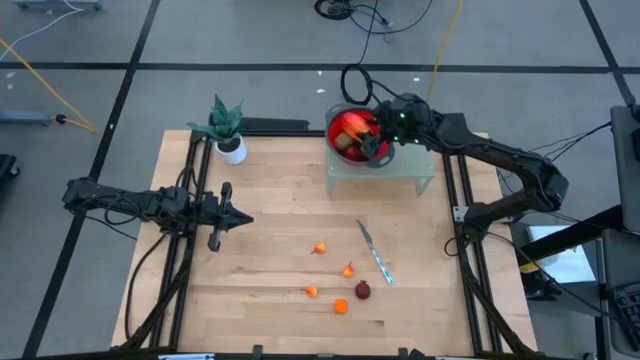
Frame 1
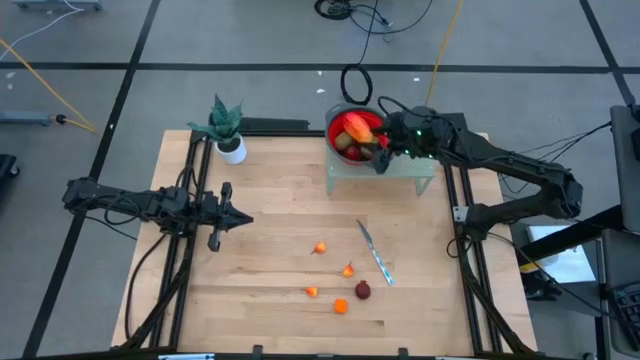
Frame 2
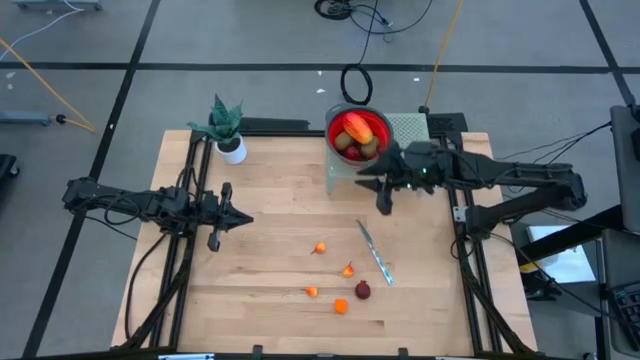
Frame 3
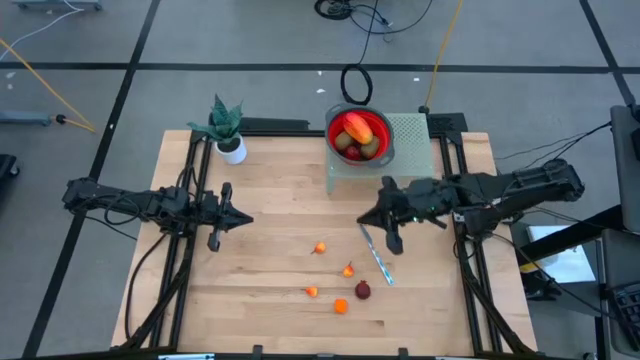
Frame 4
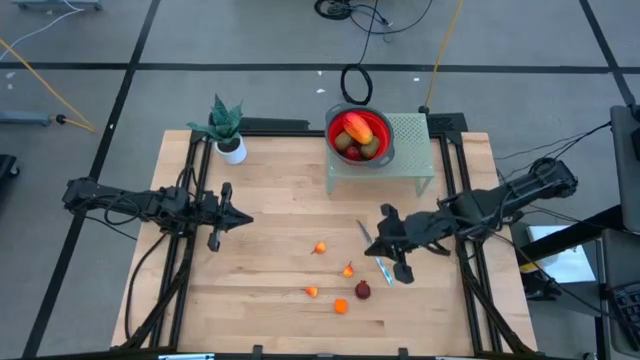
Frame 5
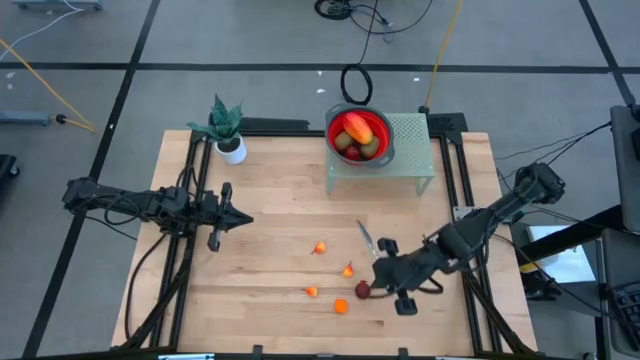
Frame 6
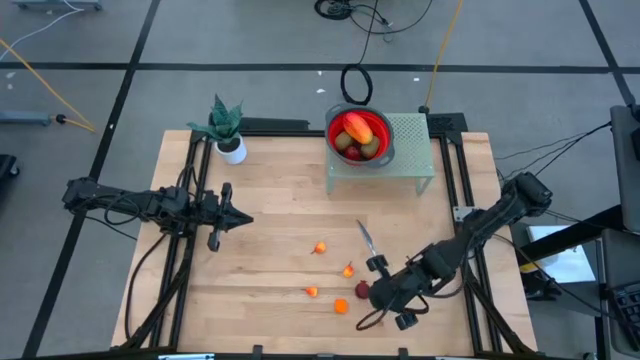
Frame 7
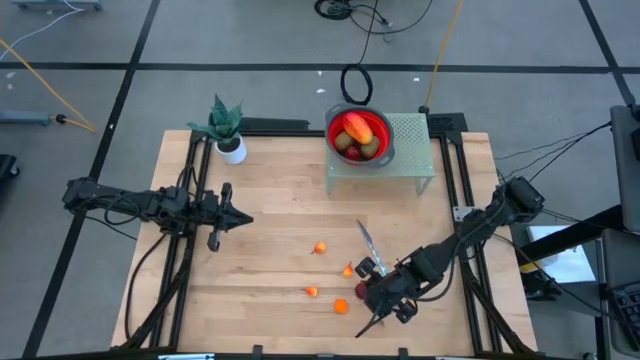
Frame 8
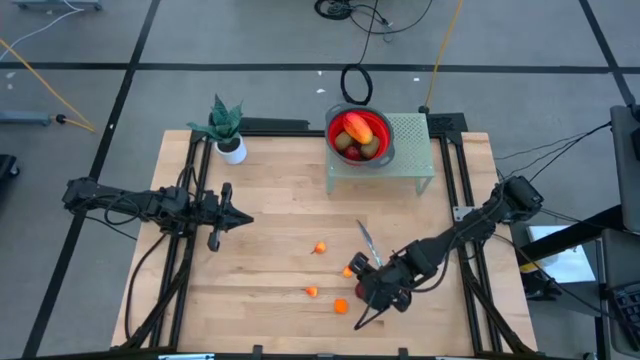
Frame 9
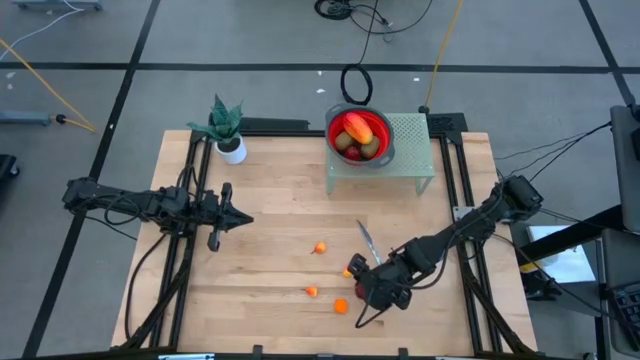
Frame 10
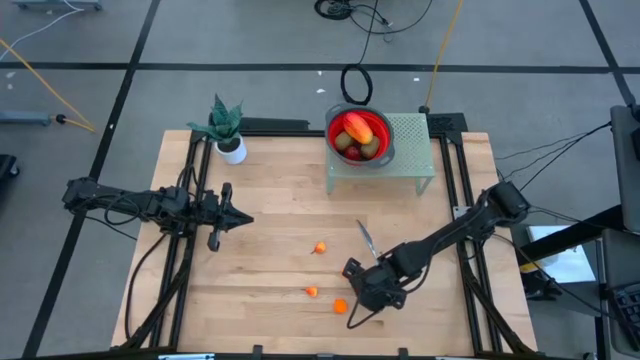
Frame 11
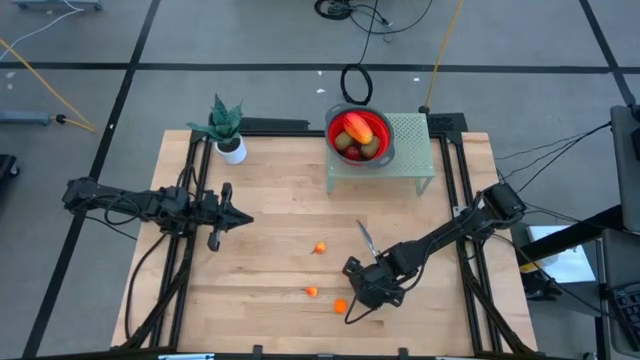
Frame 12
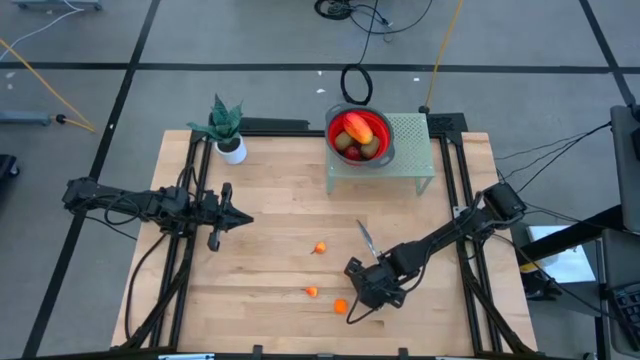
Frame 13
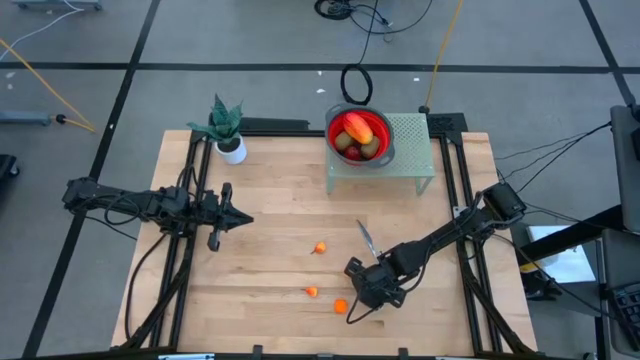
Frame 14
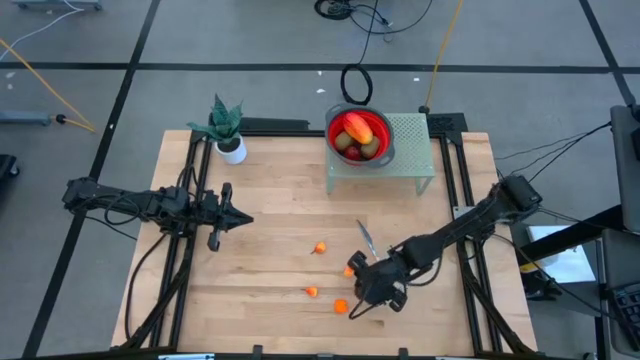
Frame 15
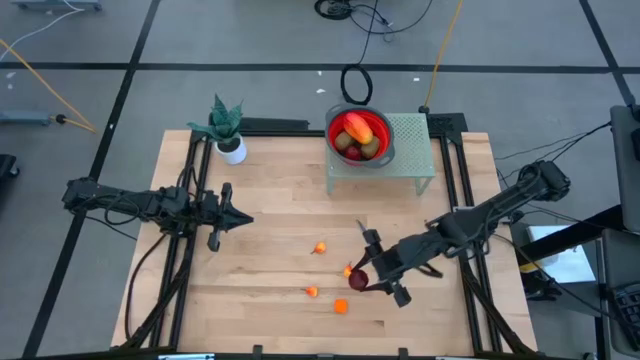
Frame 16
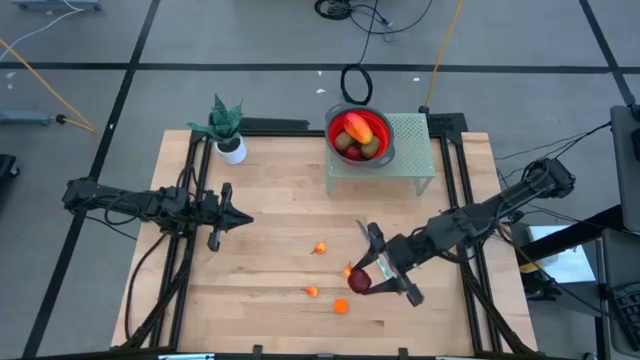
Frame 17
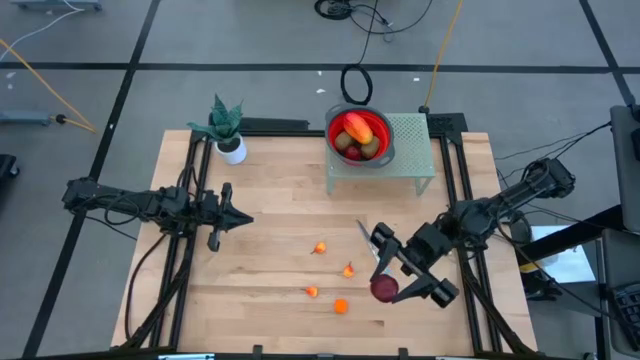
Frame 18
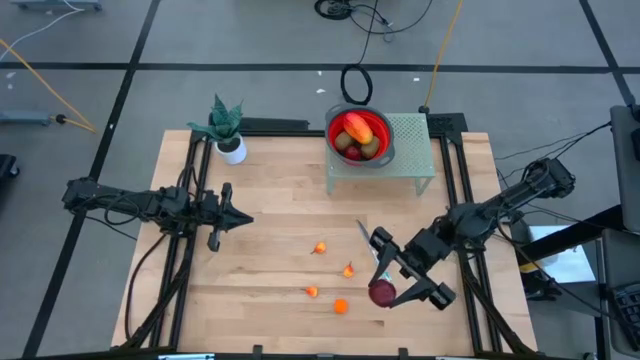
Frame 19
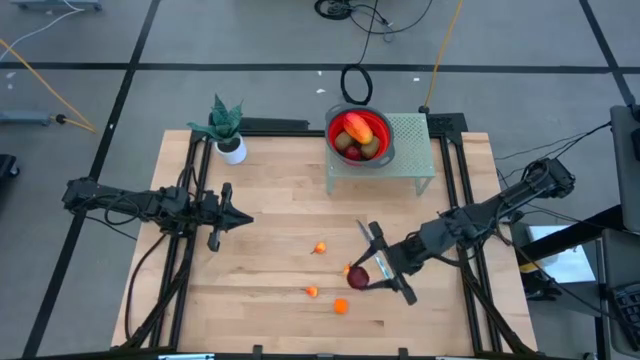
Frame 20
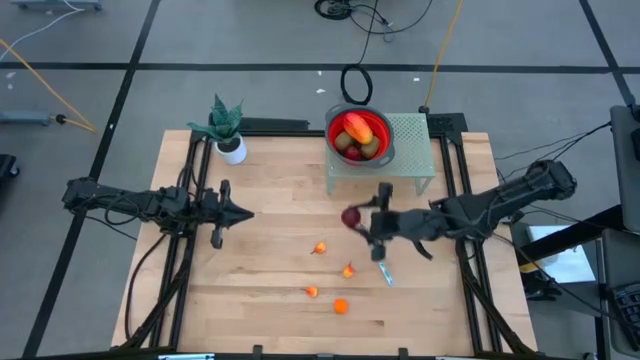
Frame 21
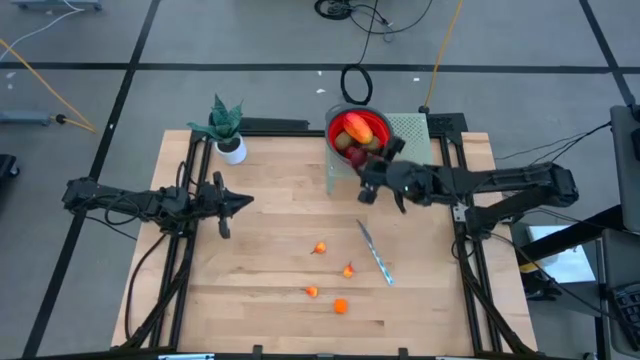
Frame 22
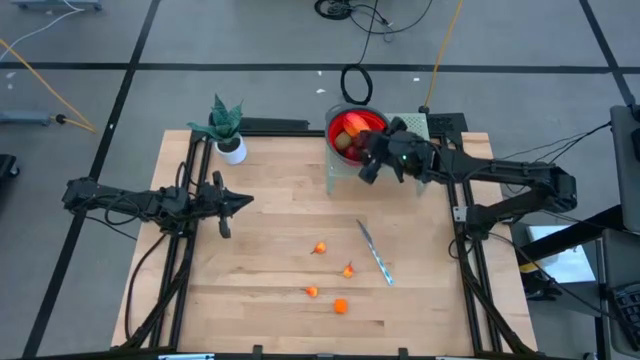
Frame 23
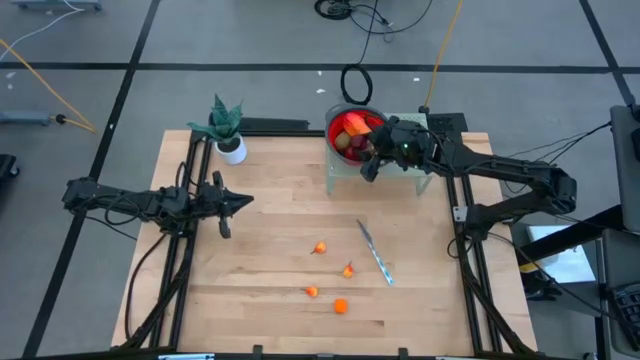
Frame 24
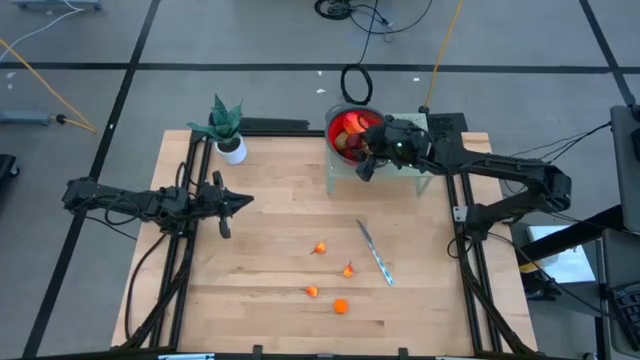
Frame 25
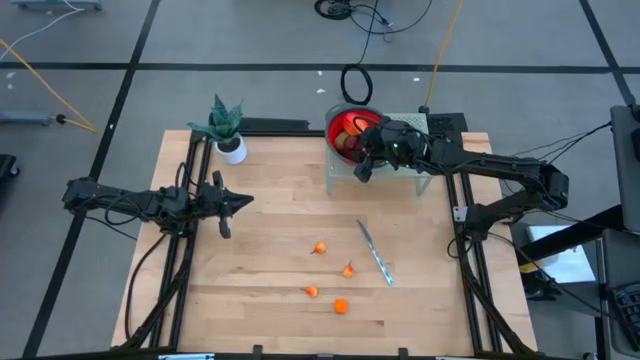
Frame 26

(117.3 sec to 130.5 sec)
Task: Pick & Place Fruit
Put the red pomegranate into the red basket on the shelf

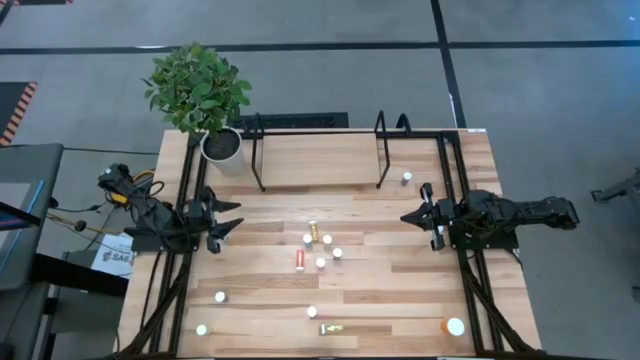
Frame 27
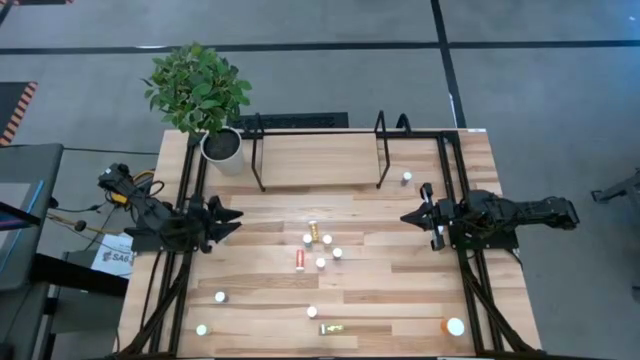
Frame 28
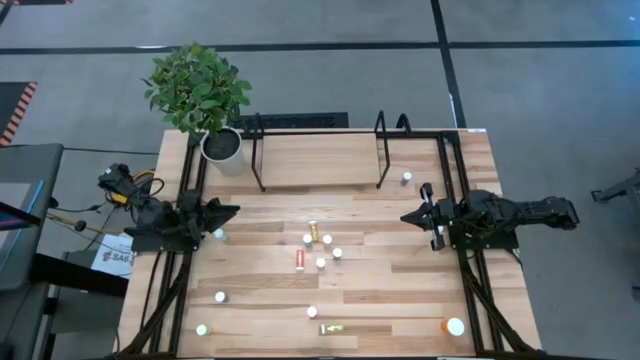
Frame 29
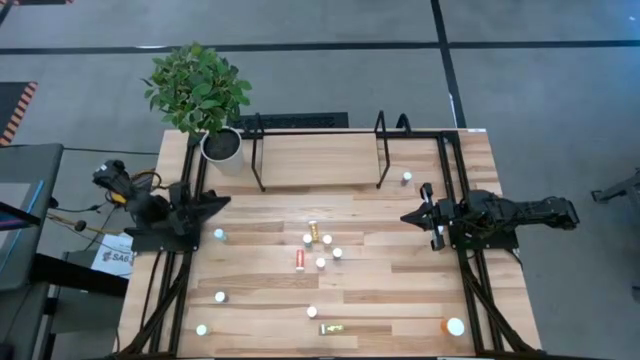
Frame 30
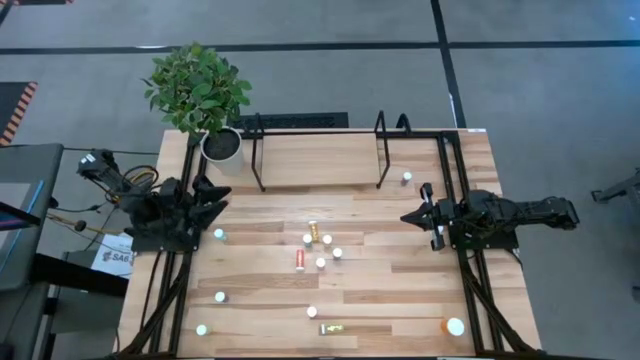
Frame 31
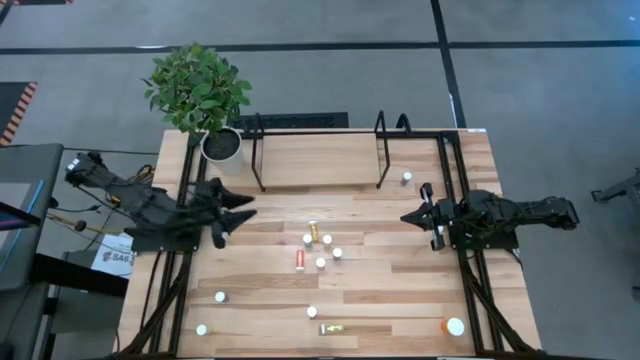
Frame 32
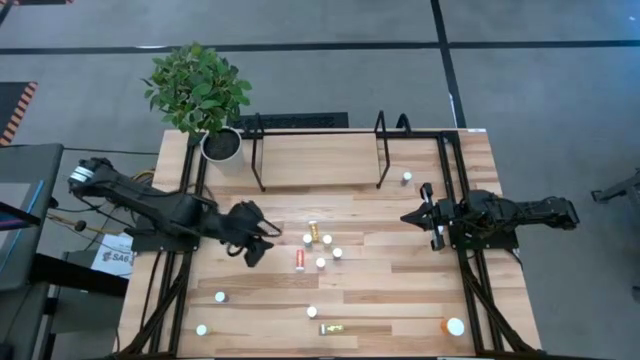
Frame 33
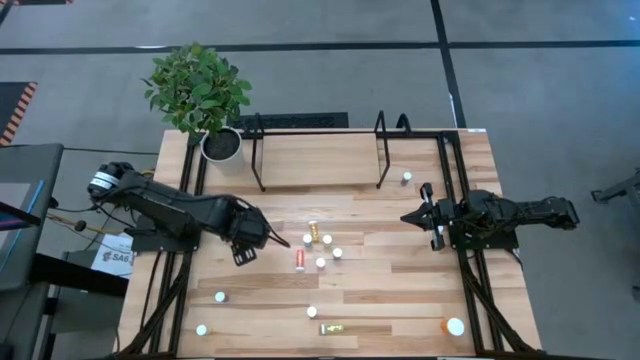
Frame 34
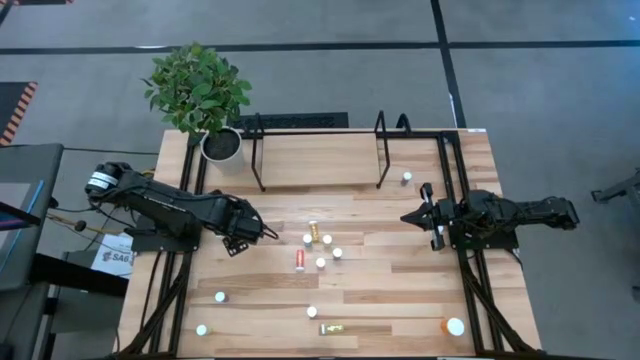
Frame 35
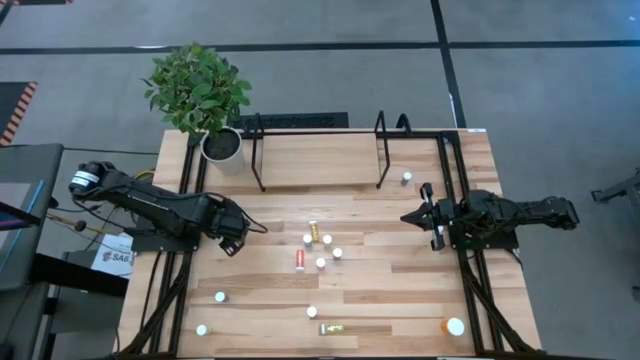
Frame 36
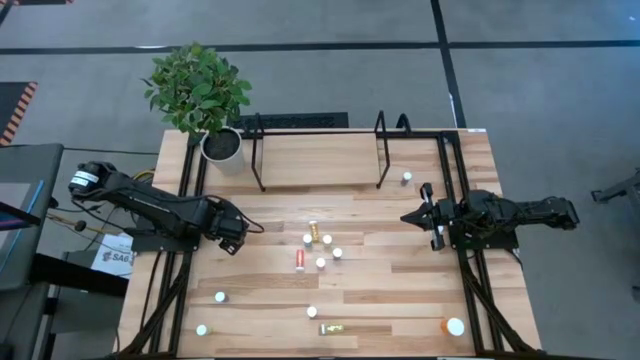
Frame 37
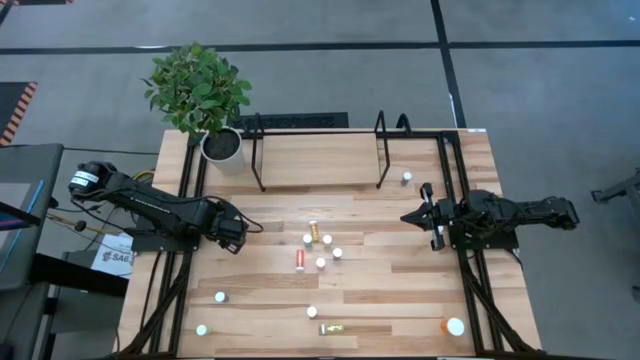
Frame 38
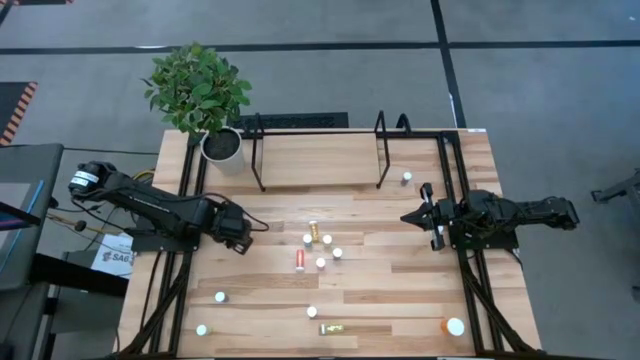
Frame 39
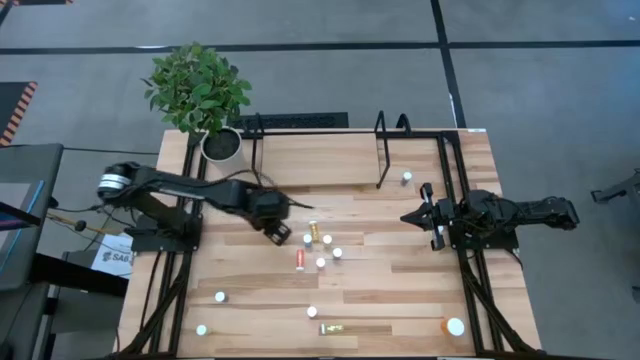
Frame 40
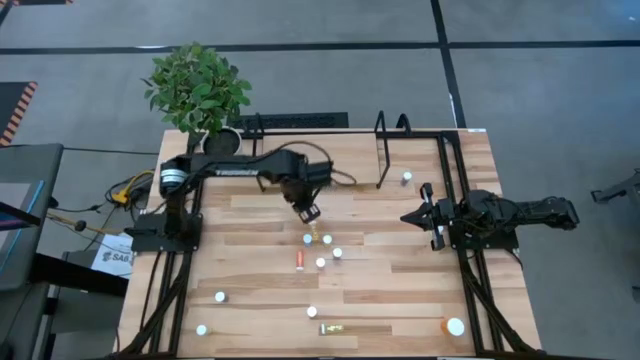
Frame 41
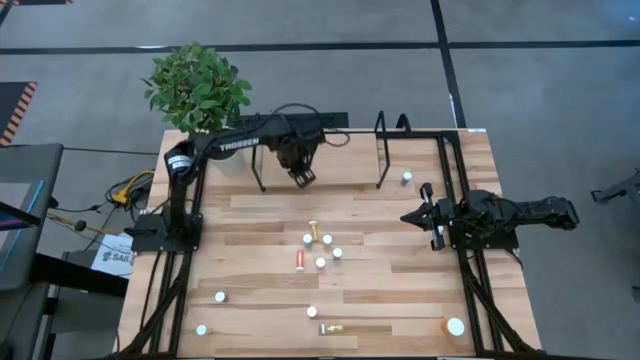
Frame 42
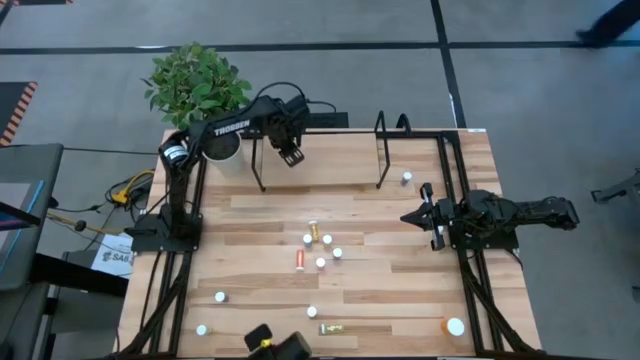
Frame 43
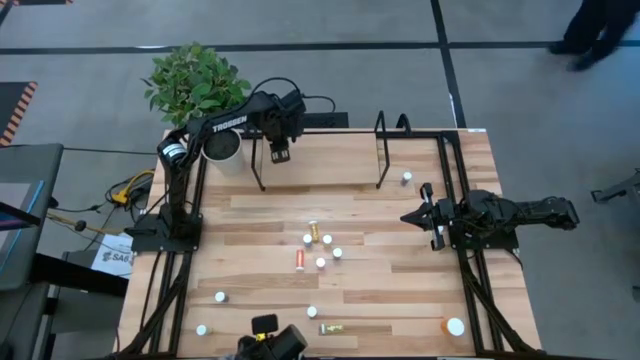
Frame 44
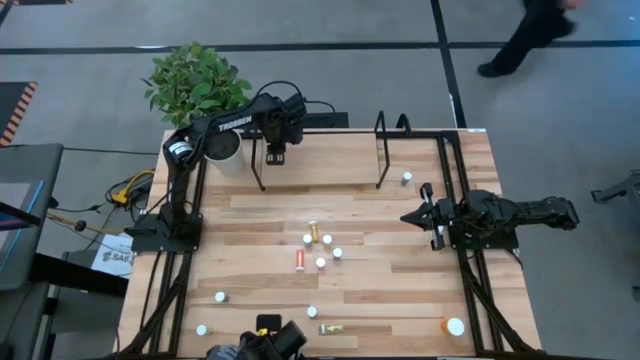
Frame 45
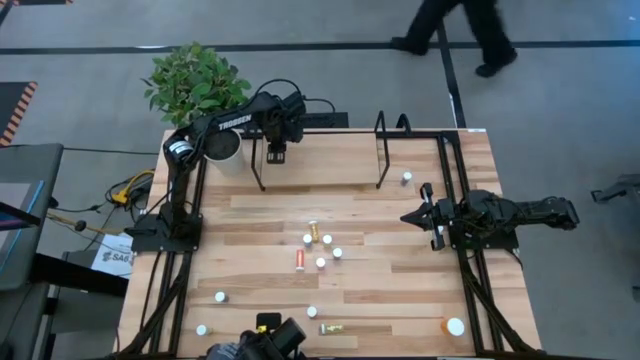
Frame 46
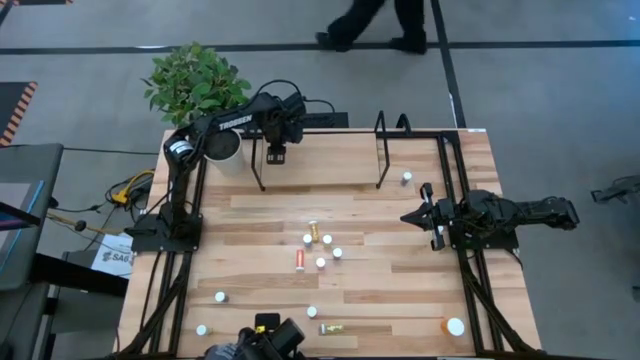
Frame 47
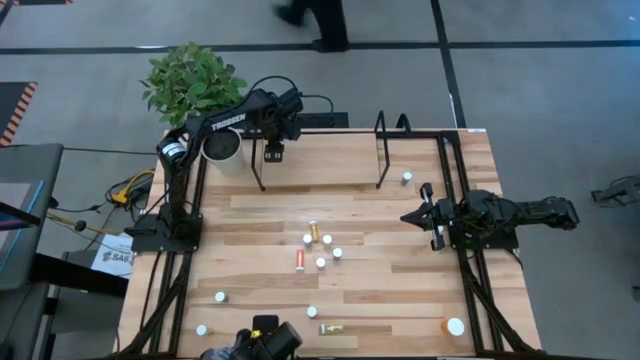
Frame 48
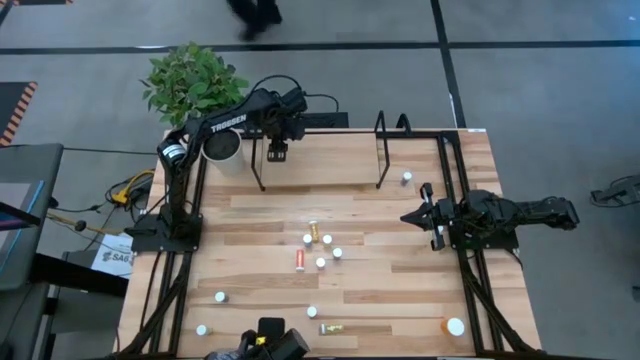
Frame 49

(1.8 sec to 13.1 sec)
Task: Pick and place medicine bottles onto shelf by color
Put the blue pill bottle on the shelf
